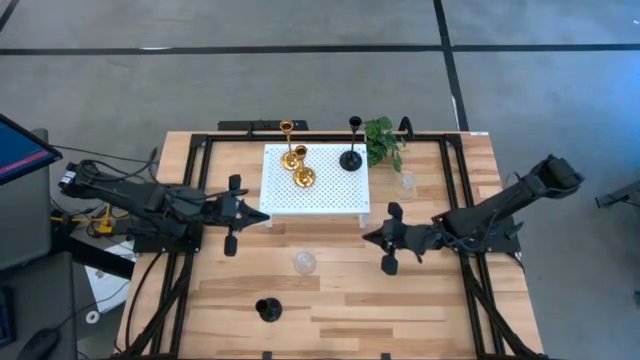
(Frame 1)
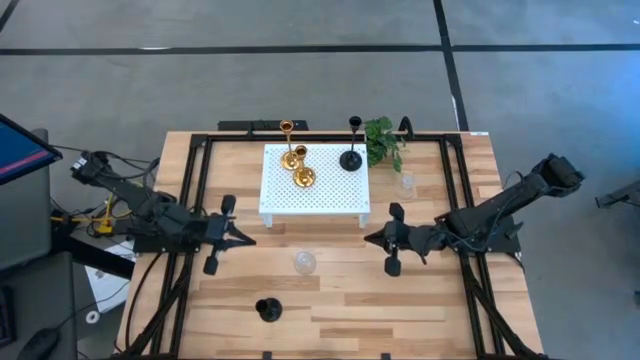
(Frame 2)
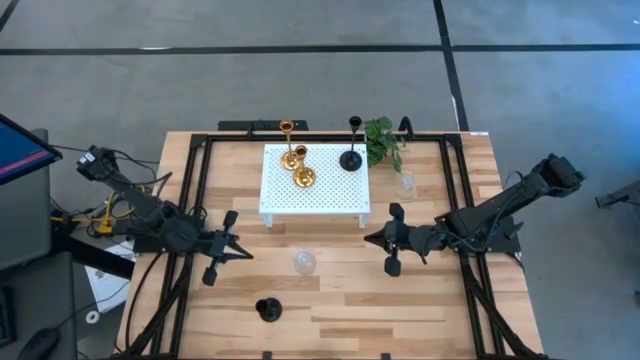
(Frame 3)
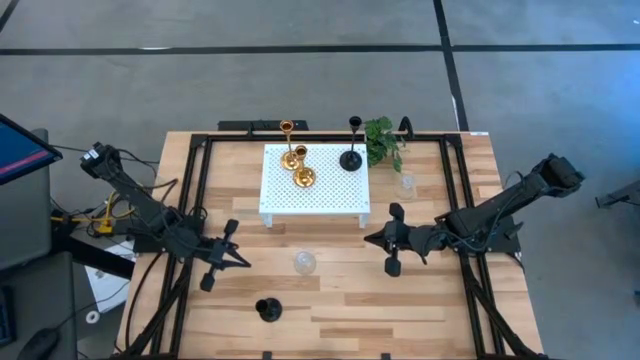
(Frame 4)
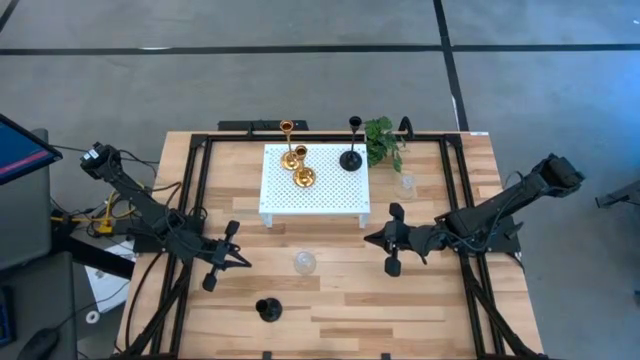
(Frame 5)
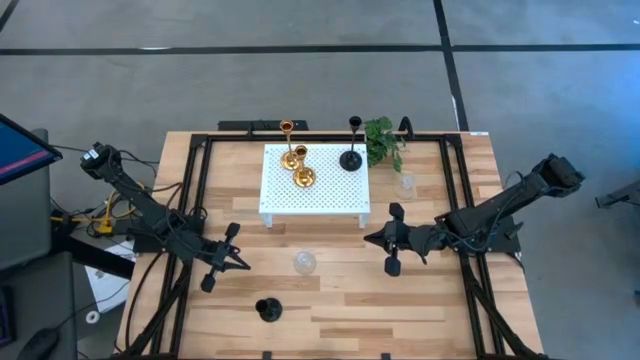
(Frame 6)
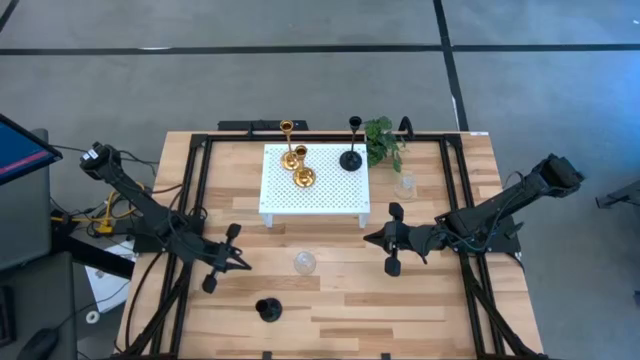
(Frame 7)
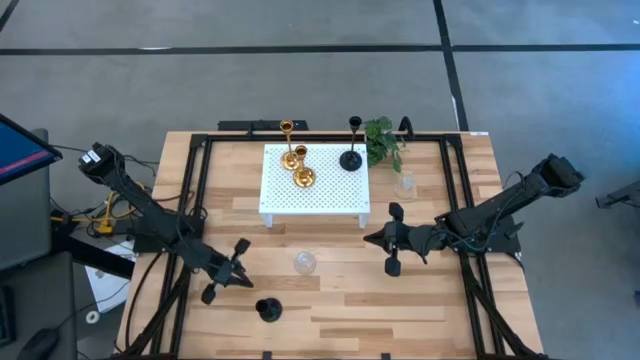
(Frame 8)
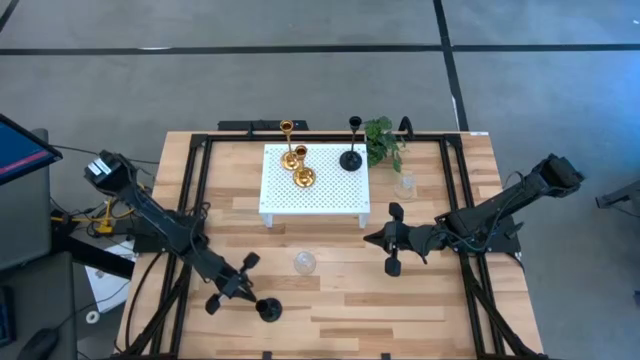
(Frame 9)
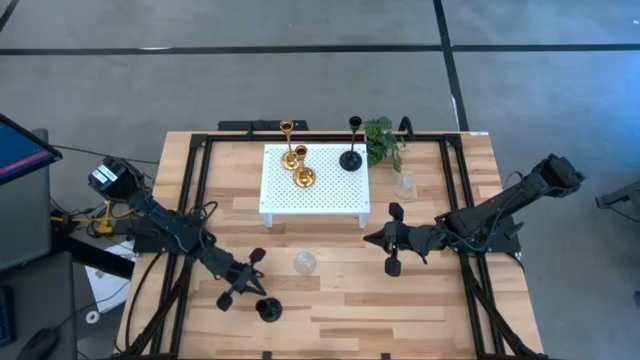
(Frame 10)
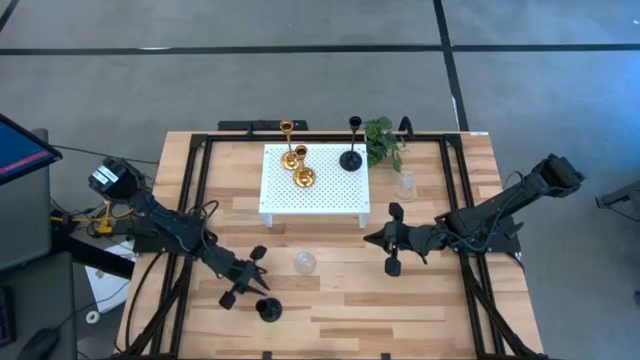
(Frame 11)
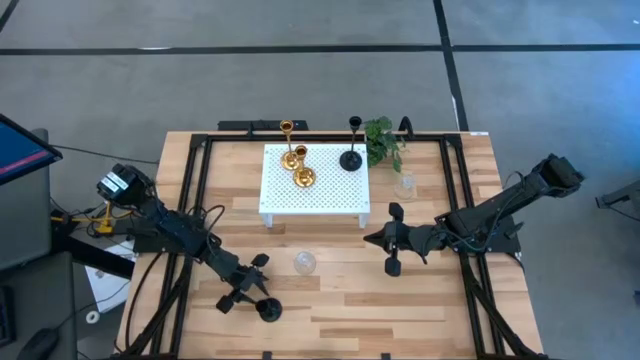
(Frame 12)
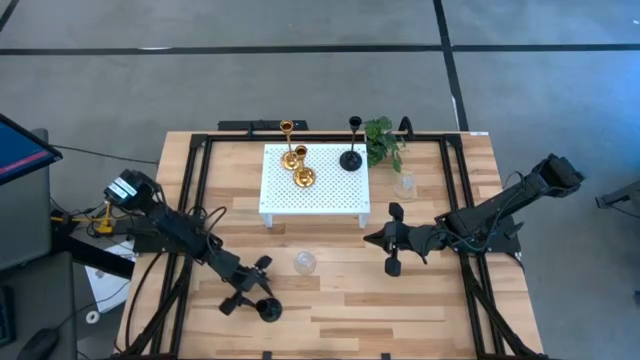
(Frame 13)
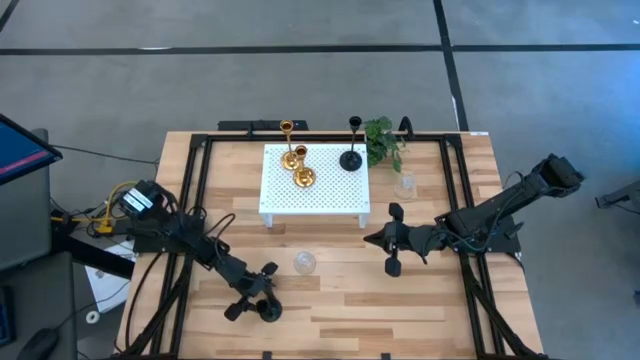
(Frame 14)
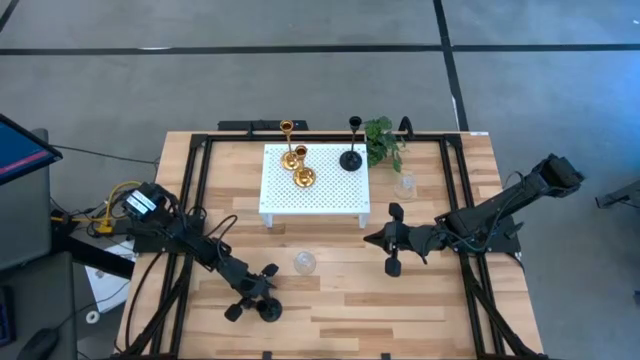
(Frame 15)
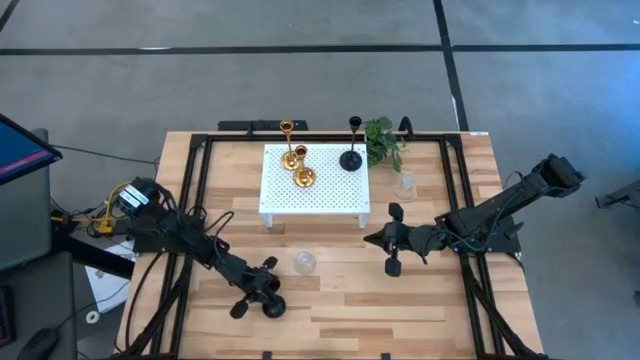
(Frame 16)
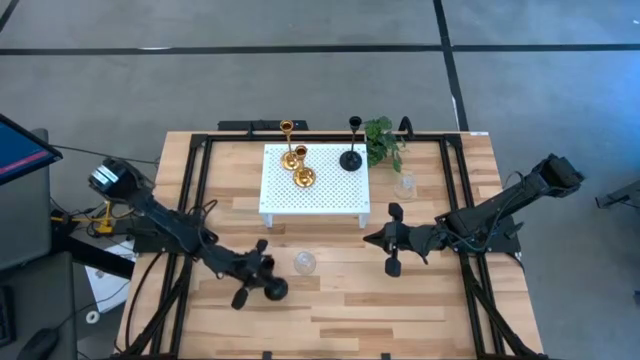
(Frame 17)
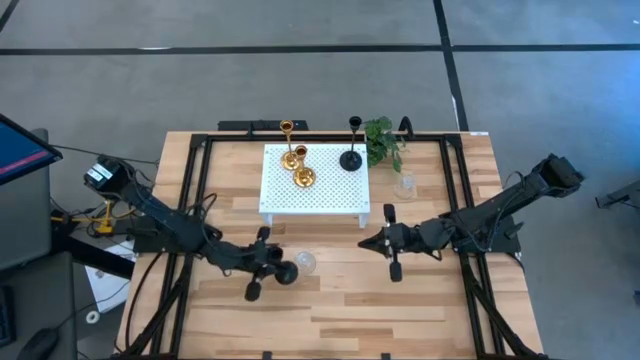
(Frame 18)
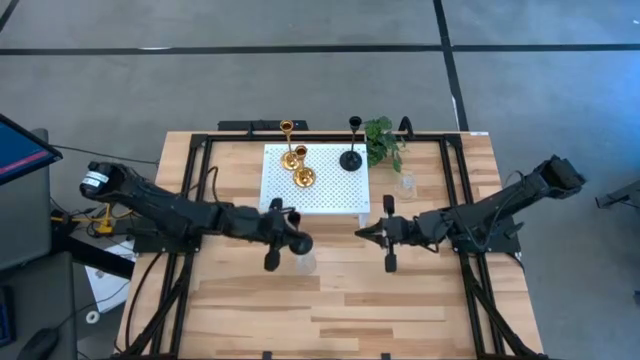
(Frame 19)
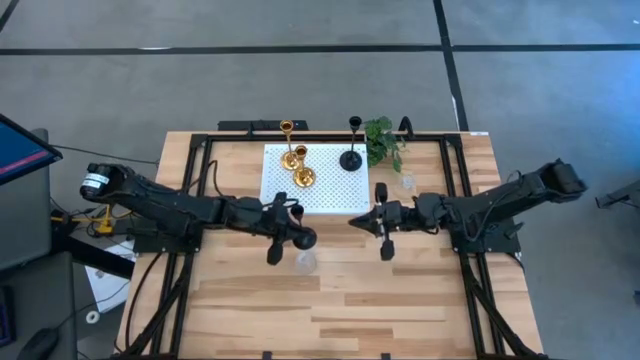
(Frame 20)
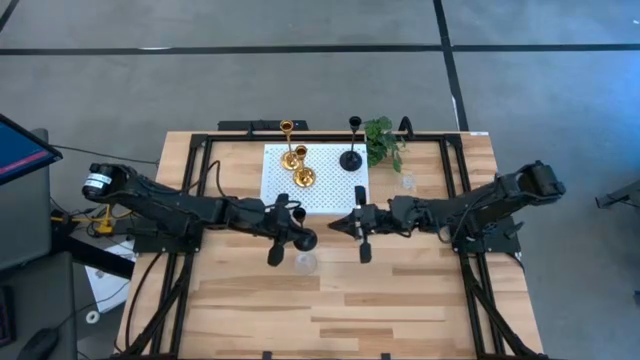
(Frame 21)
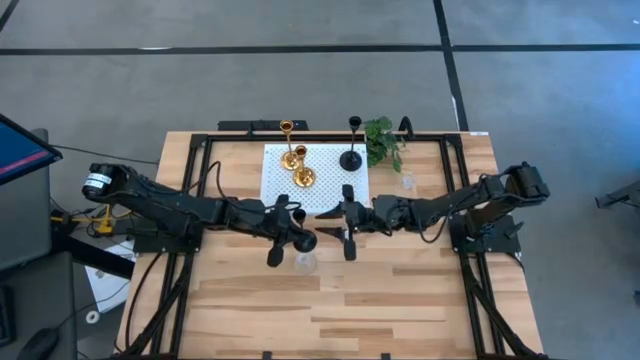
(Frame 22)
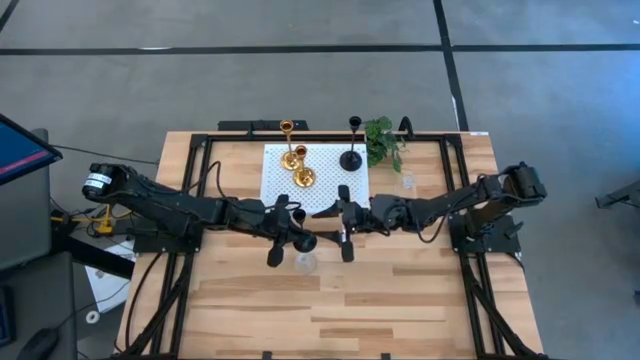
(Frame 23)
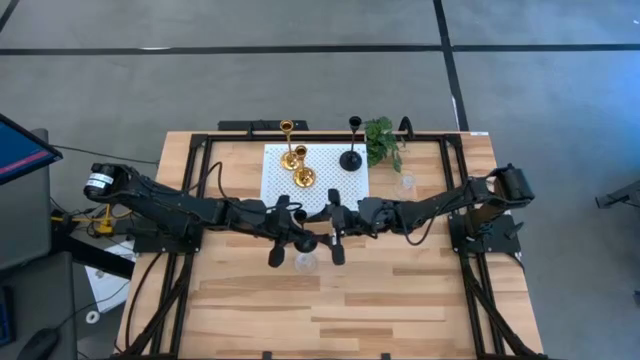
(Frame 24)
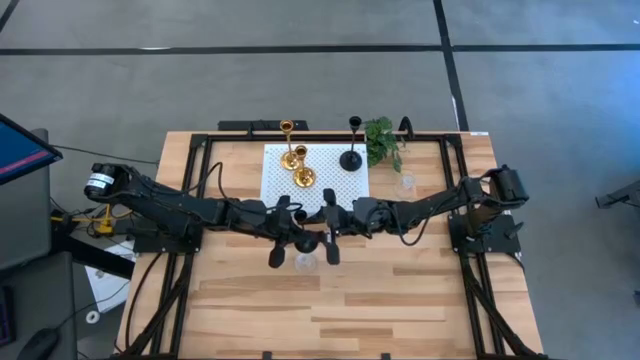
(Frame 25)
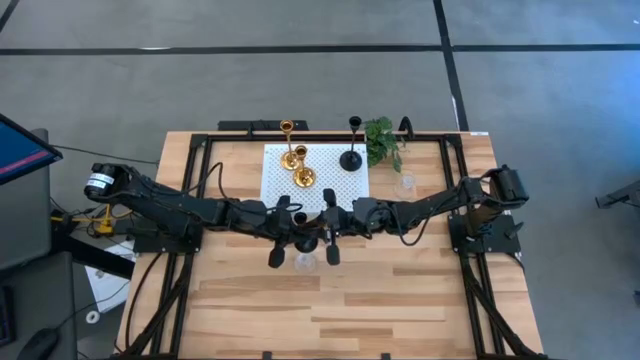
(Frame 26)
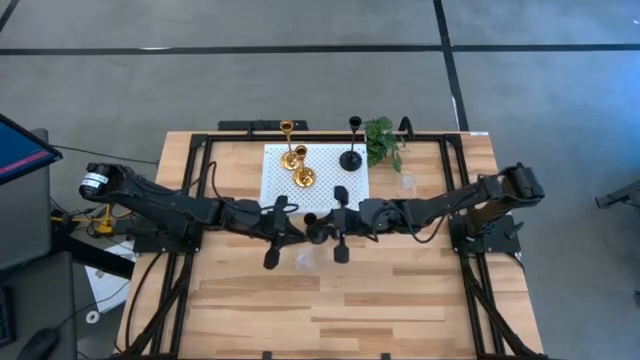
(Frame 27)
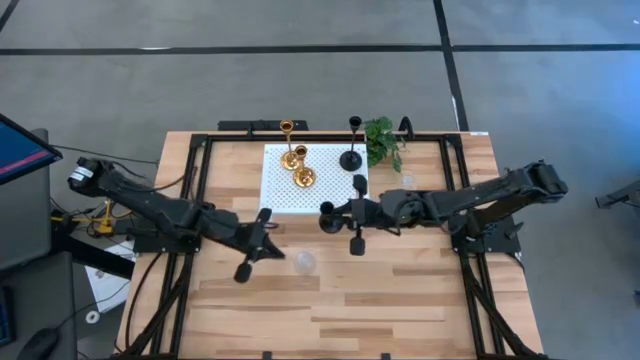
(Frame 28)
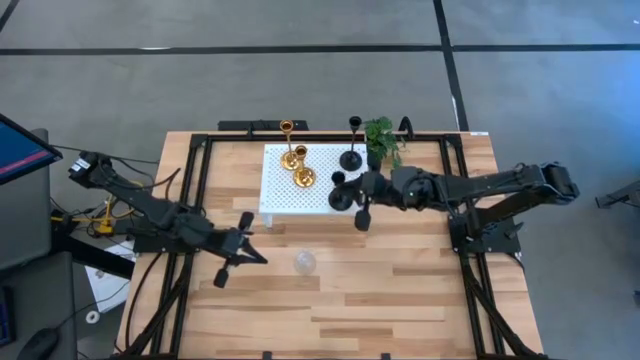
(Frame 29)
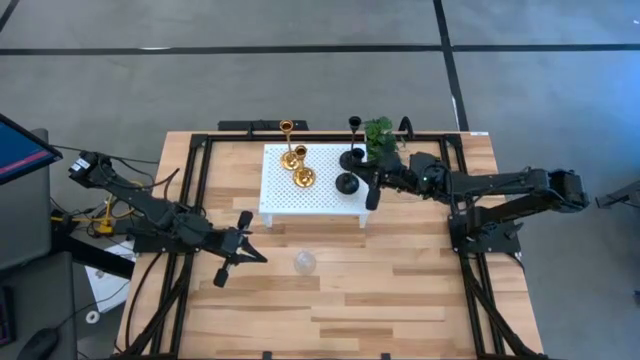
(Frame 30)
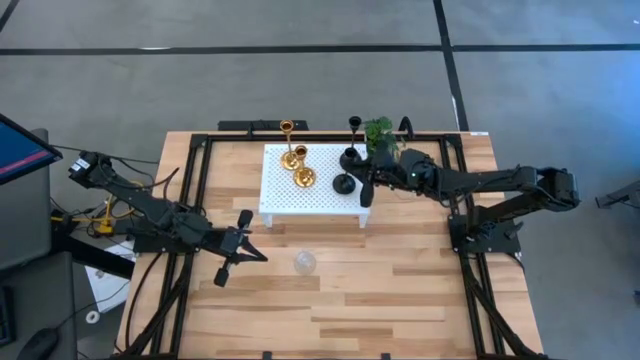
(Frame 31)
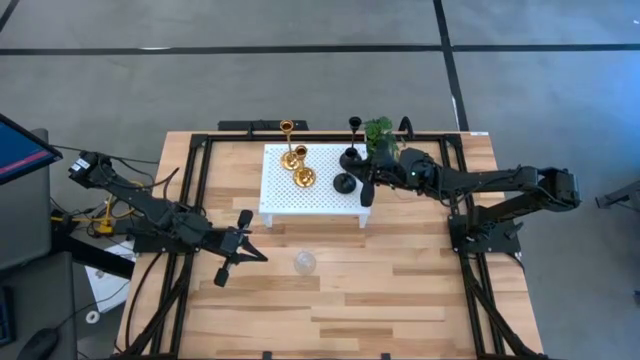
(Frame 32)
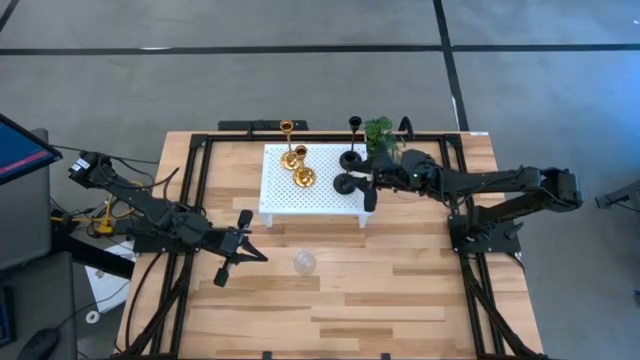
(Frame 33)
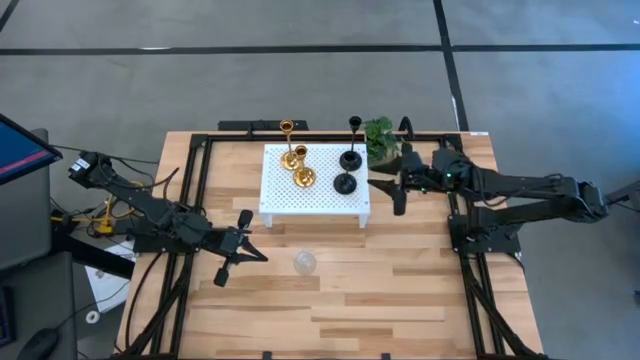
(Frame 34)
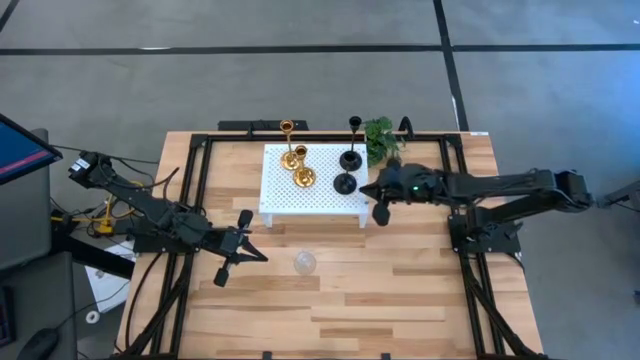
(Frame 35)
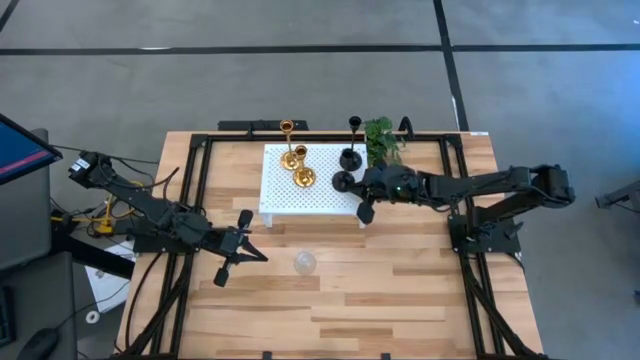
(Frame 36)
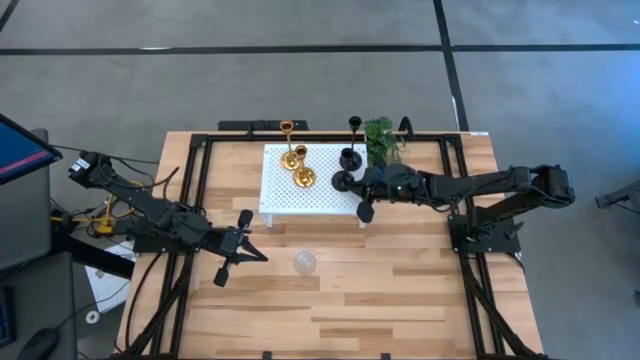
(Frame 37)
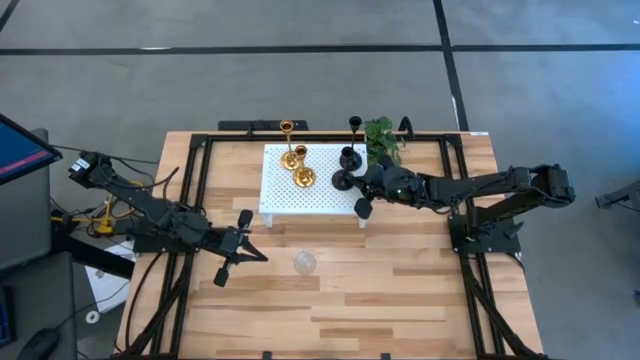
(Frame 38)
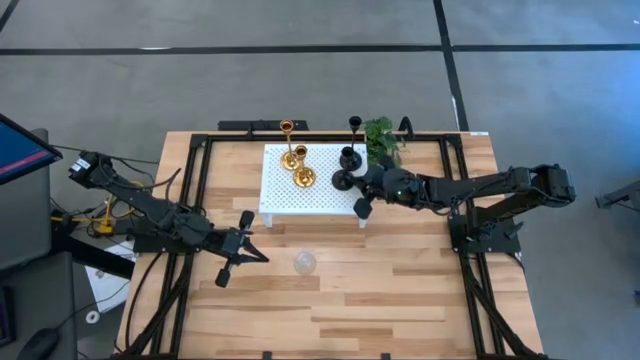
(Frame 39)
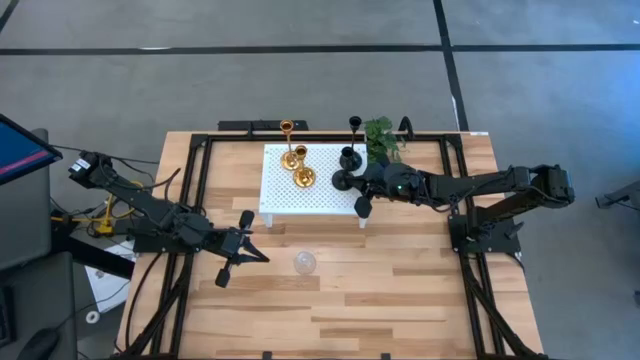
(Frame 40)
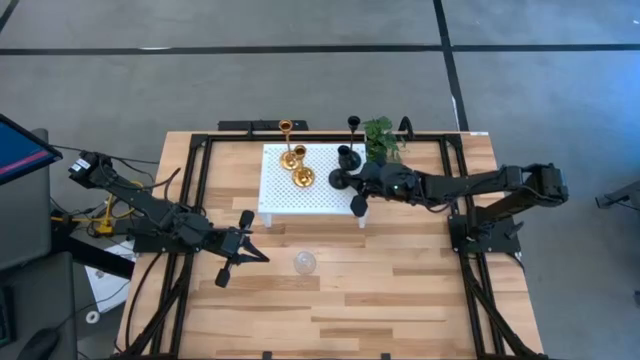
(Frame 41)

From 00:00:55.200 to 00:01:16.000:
Task: Pick & Place candle stick holders
Put the black candle holder on the shelf

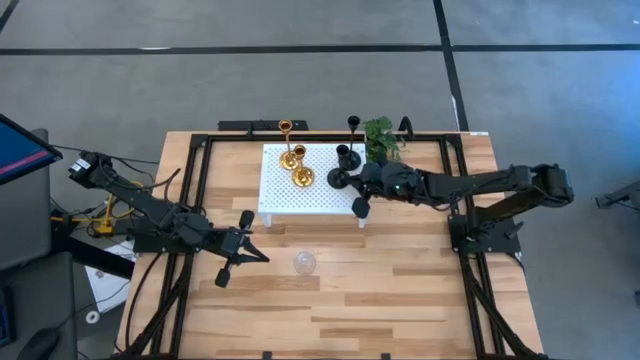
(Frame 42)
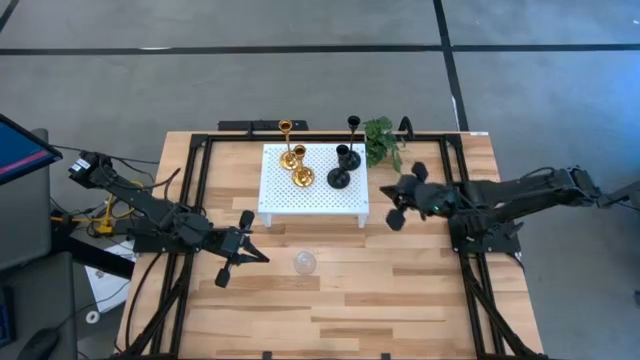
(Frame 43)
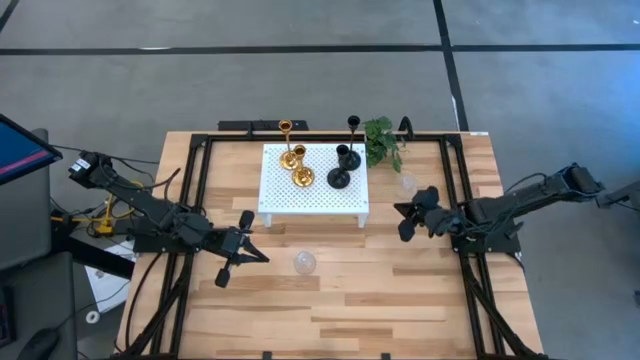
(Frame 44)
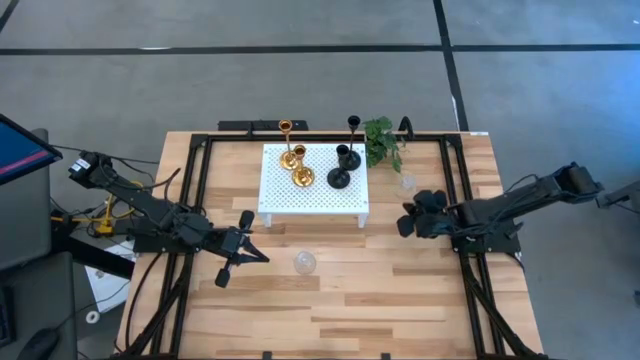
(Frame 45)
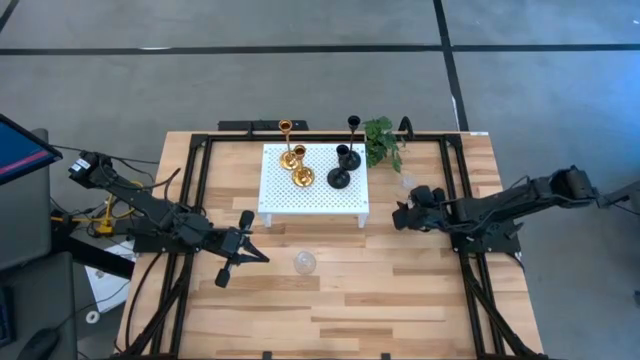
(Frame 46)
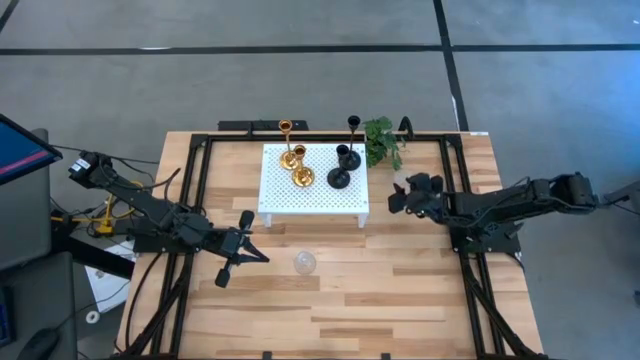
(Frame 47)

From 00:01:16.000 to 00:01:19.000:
Put the top transparent glass candle holder on the shelf
